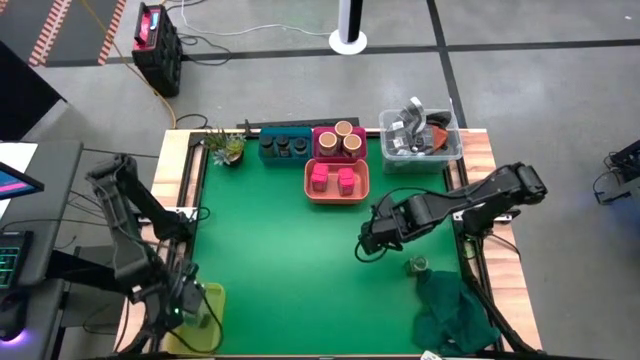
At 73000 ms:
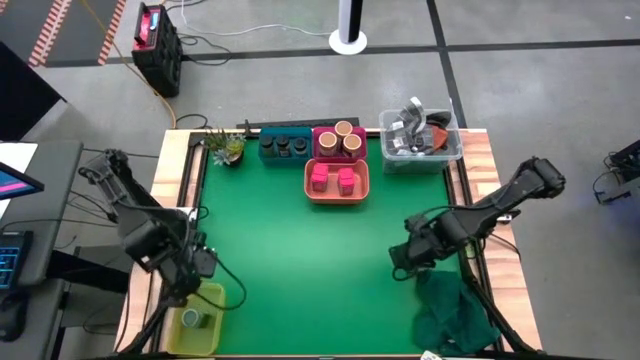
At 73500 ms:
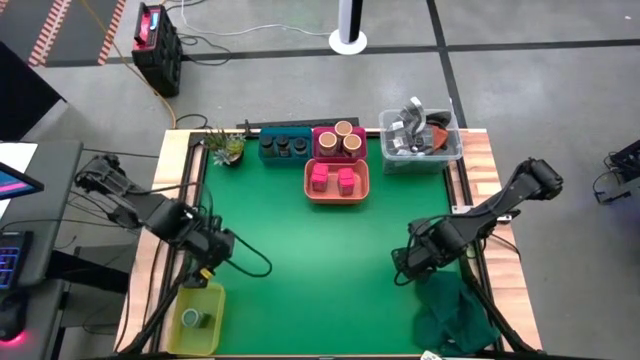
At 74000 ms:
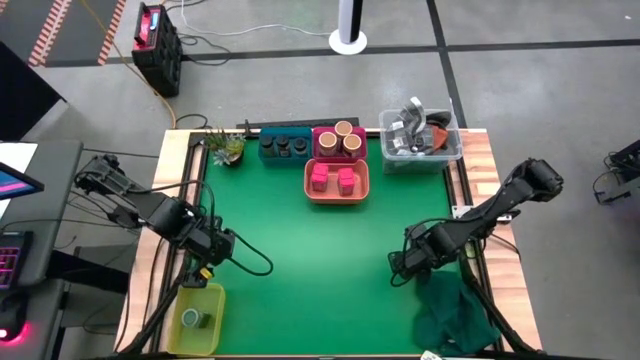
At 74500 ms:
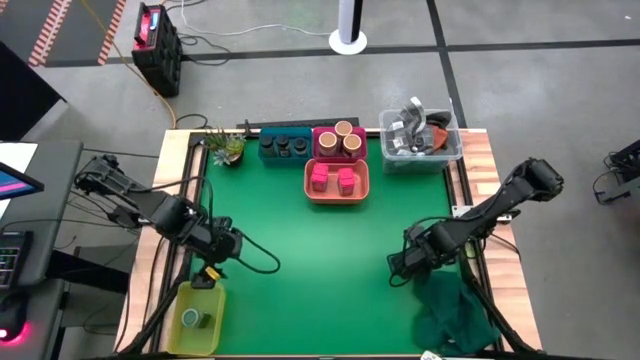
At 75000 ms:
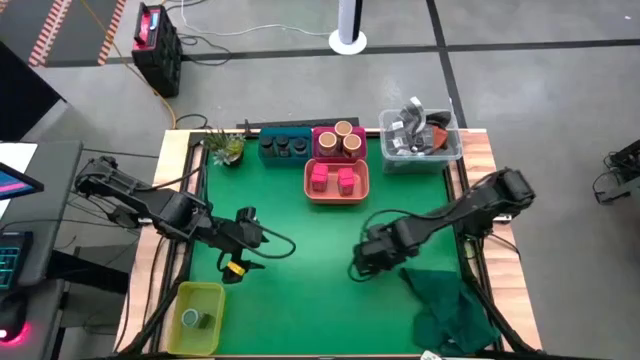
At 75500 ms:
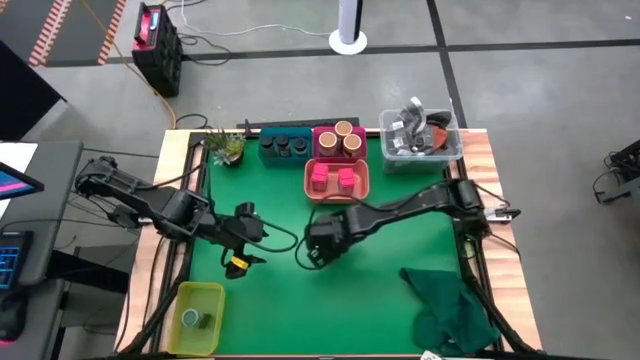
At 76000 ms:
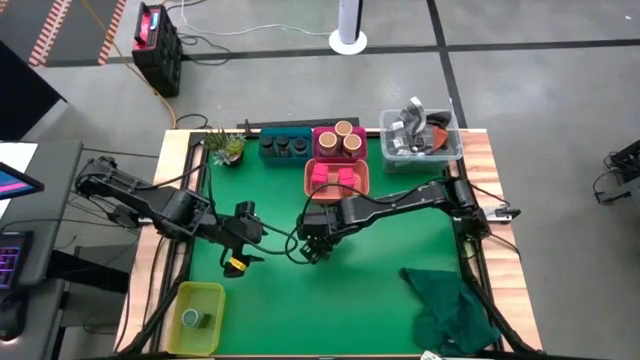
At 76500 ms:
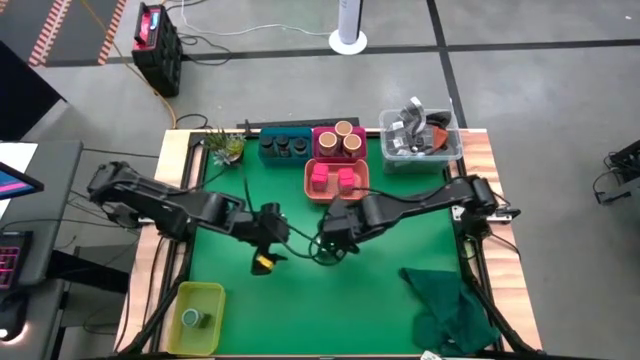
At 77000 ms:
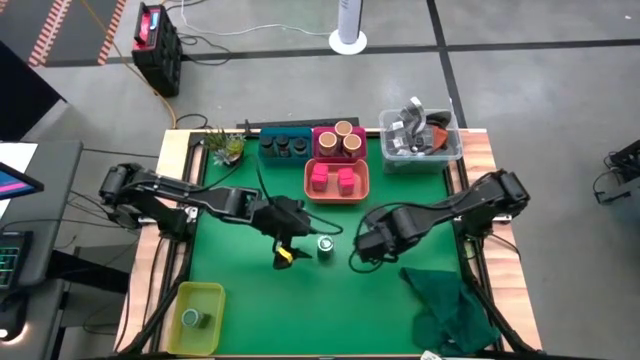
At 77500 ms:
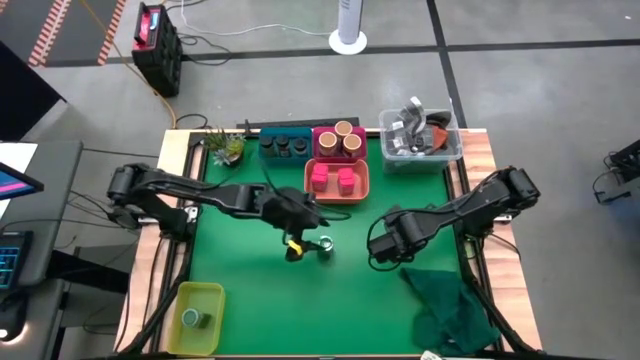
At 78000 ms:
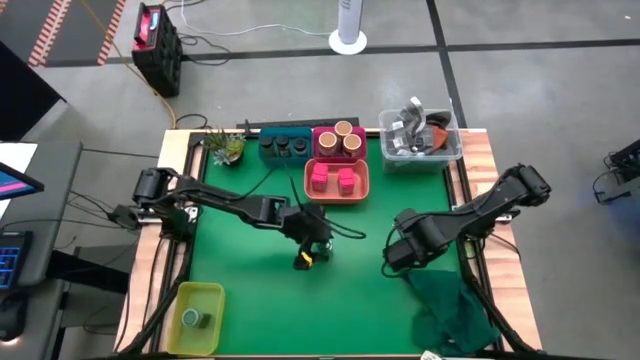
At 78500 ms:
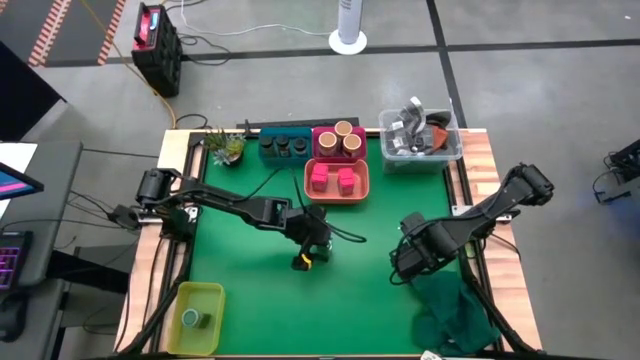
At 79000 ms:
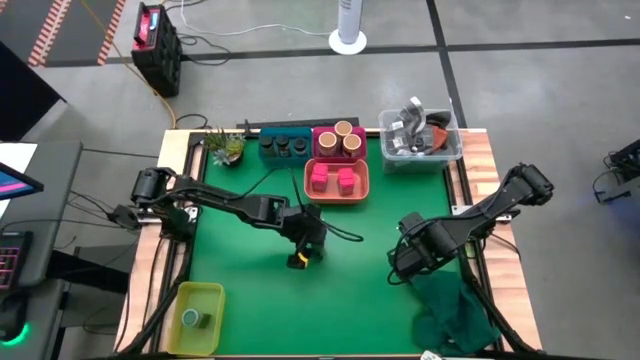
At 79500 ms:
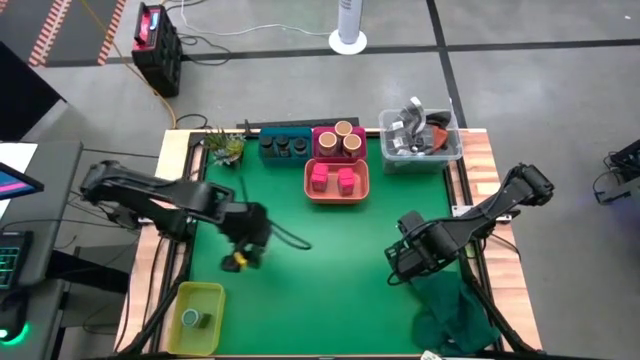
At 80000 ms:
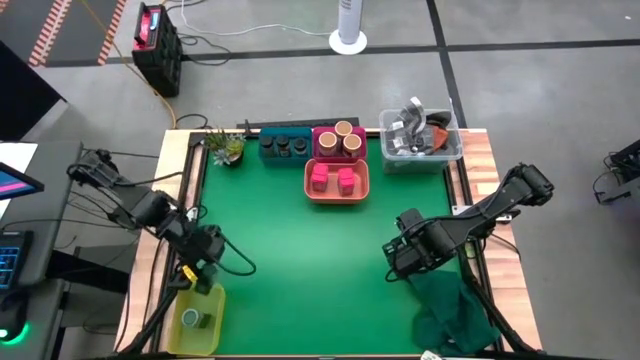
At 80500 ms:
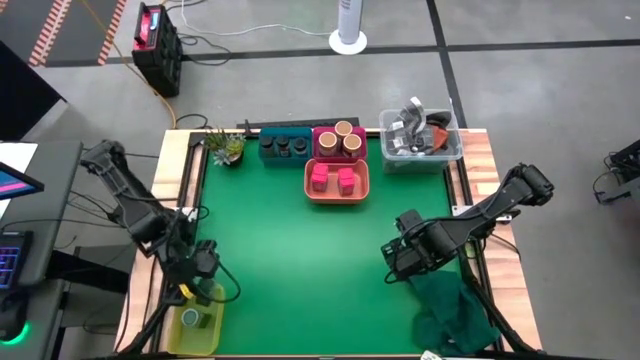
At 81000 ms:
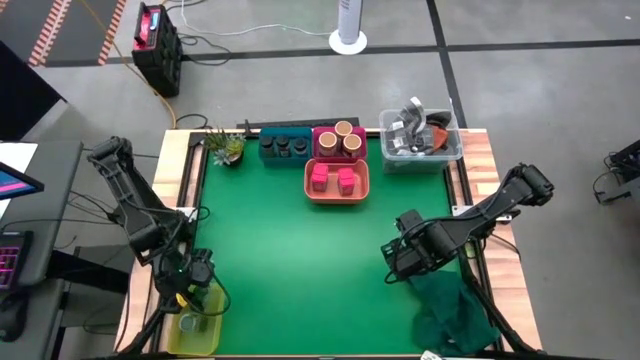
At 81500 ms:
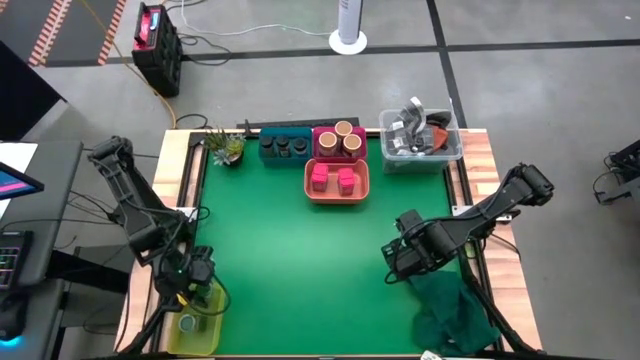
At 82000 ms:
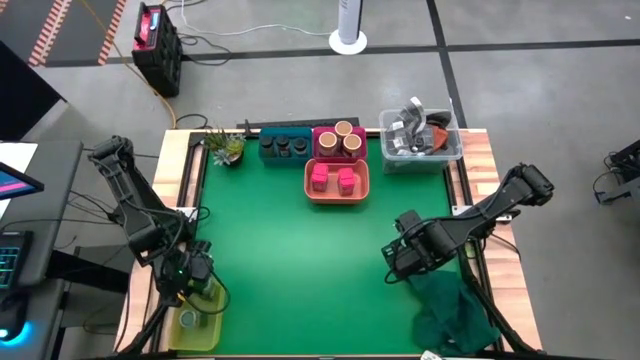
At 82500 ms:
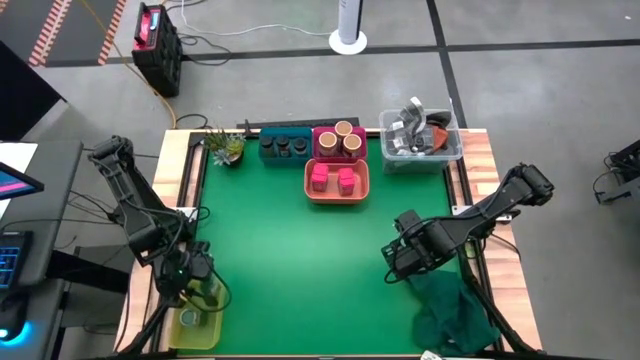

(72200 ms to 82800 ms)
Task: Sort spices by type
Put the green seasoning bottle into the yellow bin

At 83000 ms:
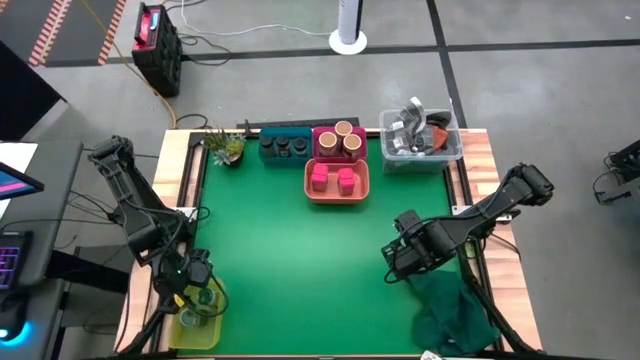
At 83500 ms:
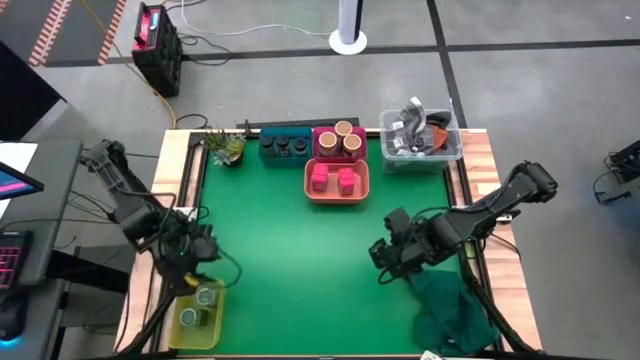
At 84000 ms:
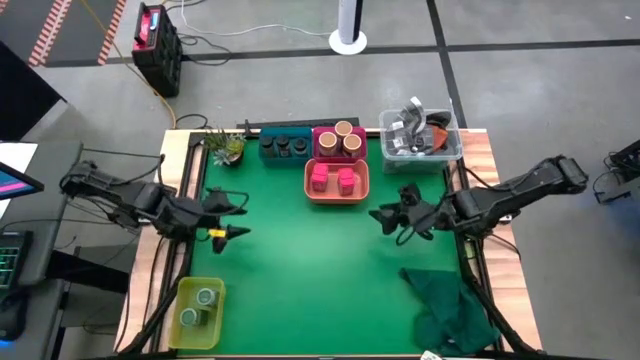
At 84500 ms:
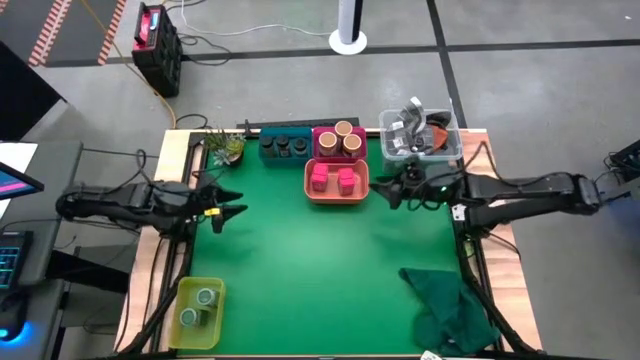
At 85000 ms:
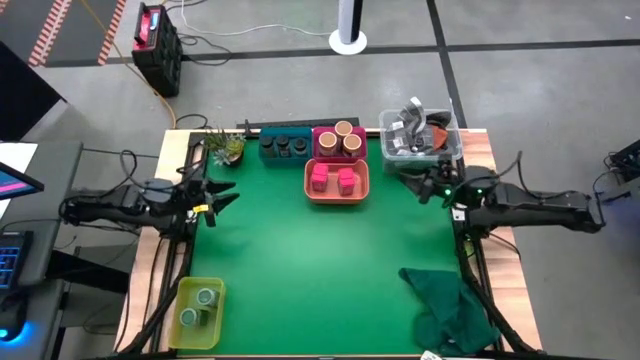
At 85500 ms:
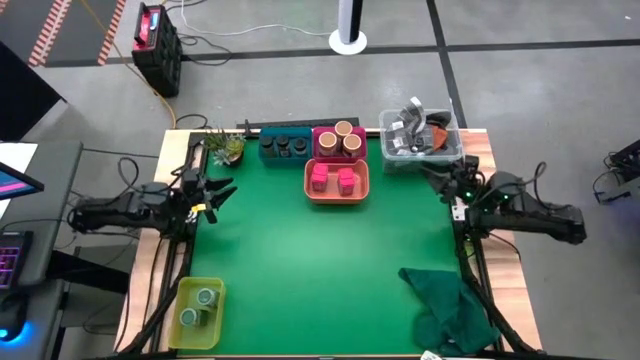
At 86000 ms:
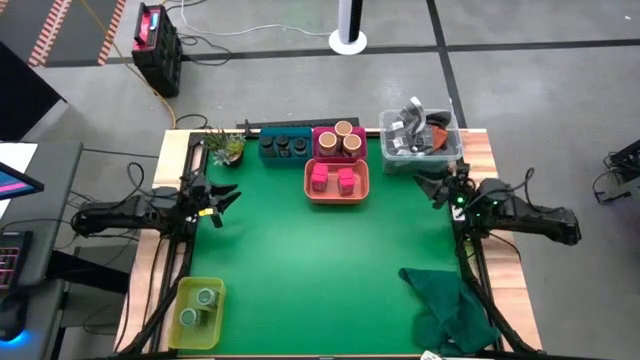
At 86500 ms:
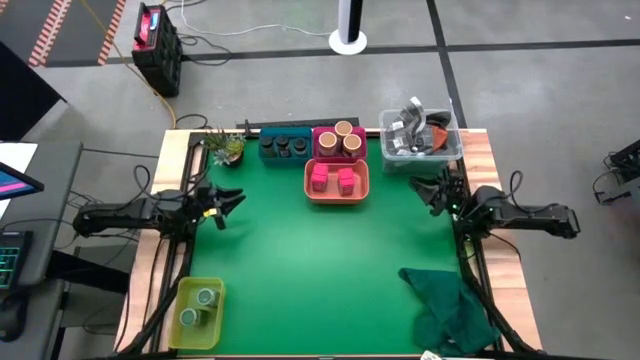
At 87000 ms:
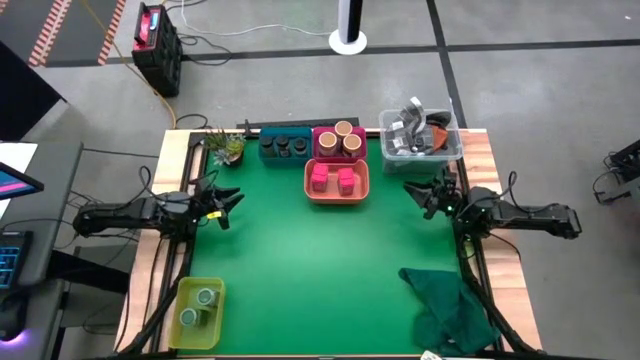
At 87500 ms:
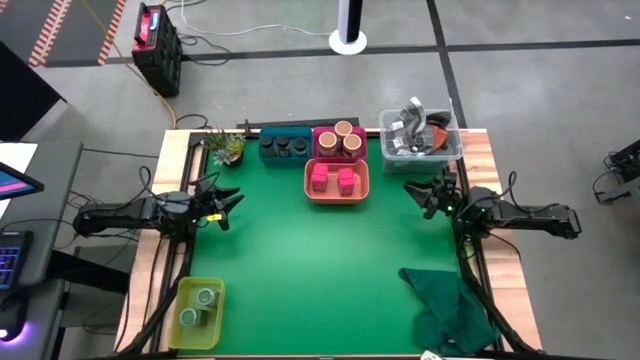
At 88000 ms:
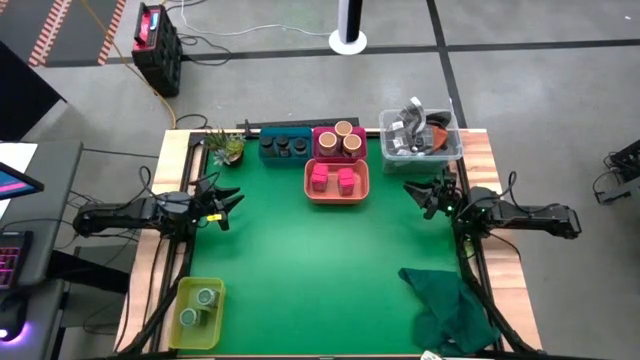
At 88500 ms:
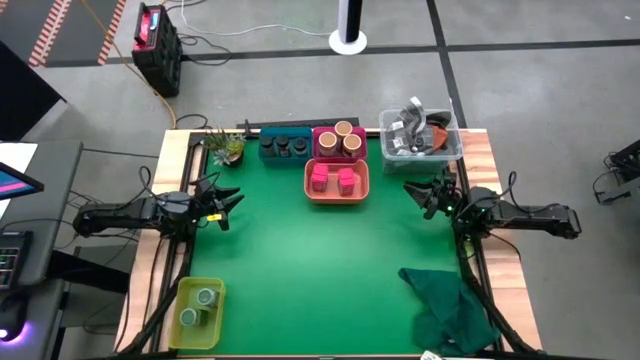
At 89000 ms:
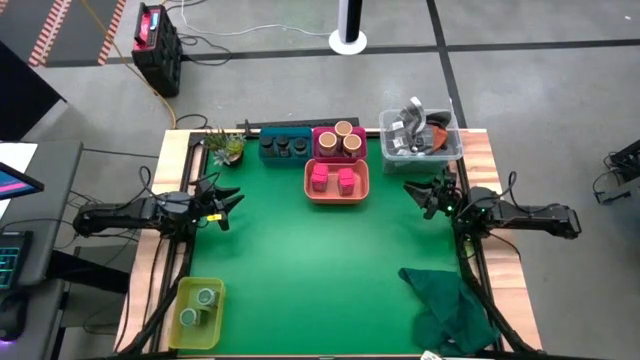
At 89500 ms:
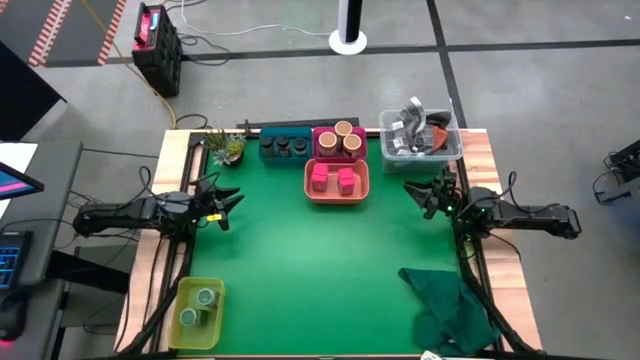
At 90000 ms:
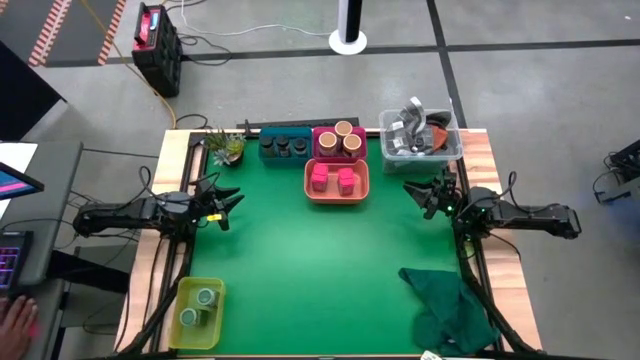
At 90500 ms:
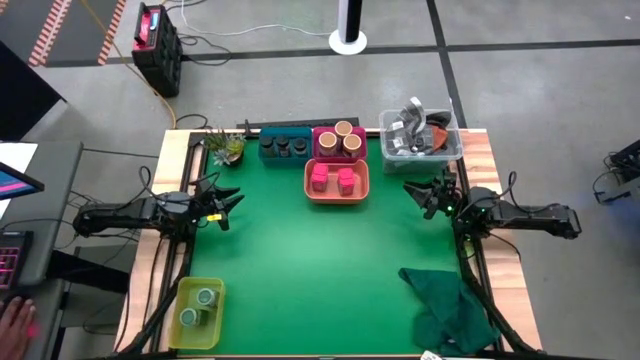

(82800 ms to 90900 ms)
Return to Home Position

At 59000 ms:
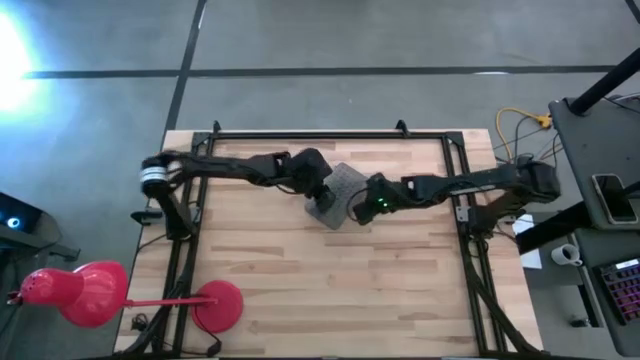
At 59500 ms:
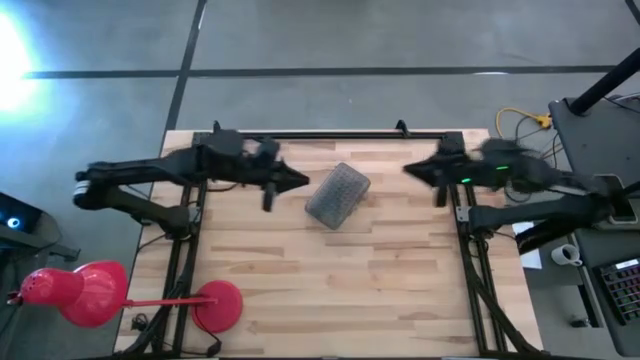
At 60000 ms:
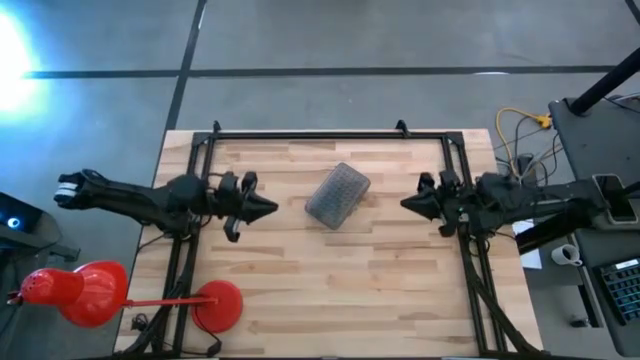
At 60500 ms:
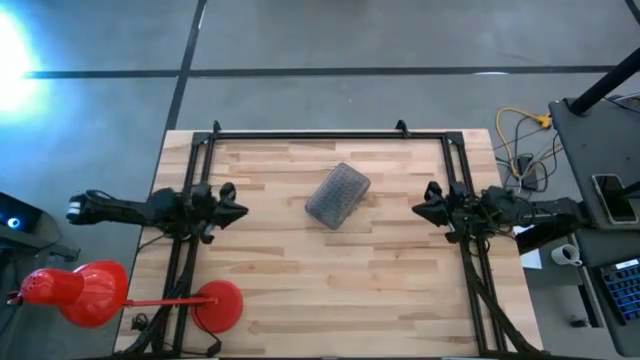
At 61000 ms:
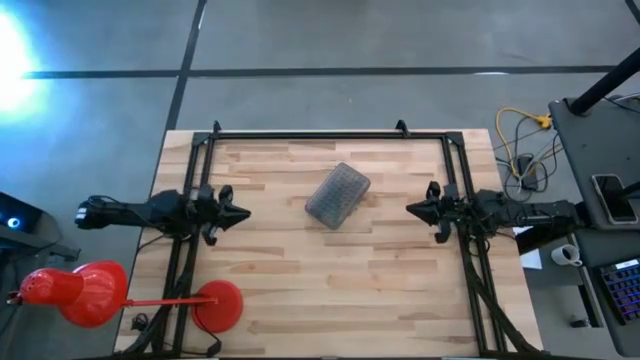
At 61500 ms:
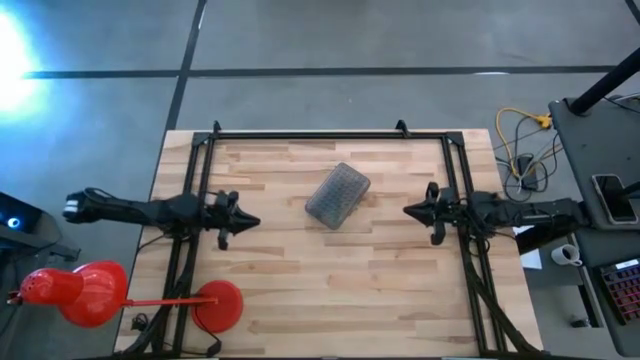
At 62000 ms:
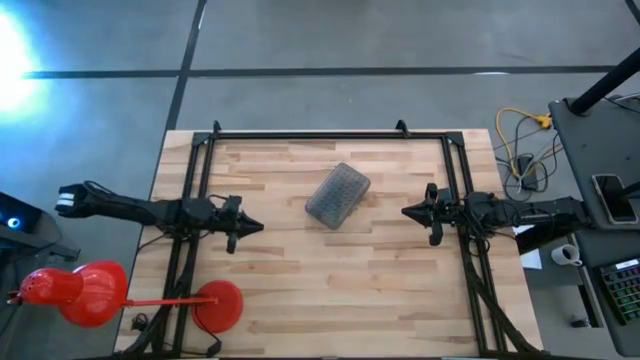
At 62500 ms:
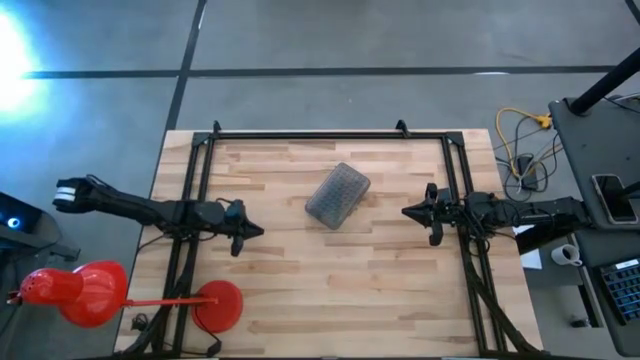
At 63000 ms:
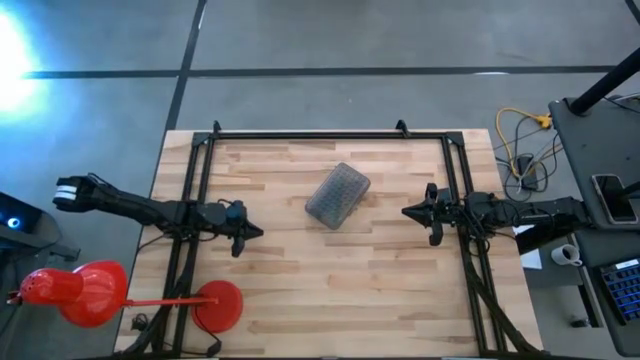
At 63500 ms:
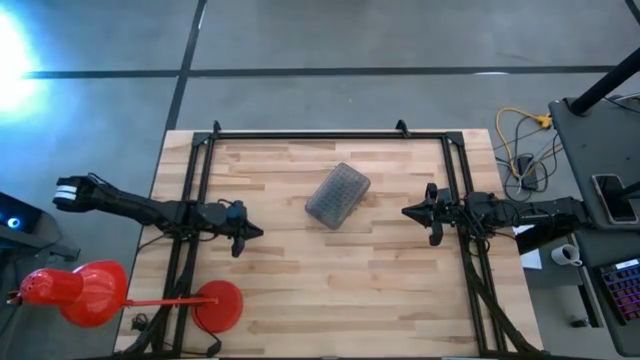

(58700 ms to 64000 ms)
Task: Pick & place school supplies into a supply box
Return to Home Position
